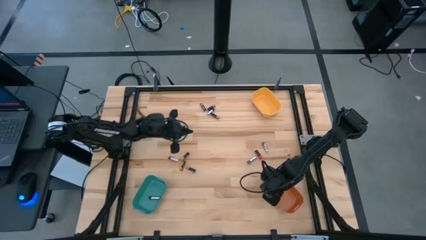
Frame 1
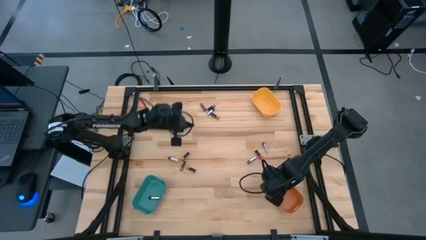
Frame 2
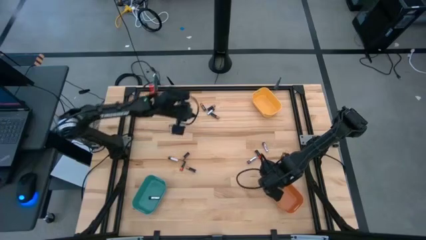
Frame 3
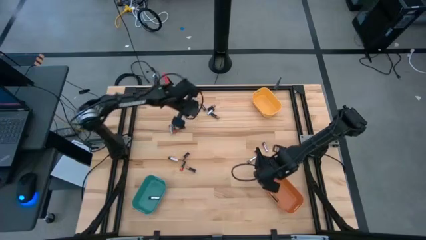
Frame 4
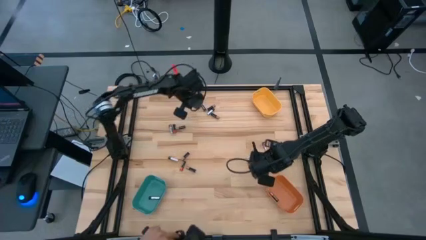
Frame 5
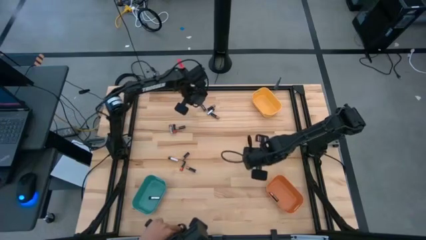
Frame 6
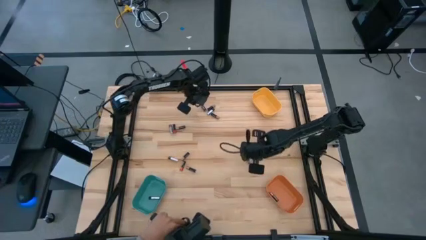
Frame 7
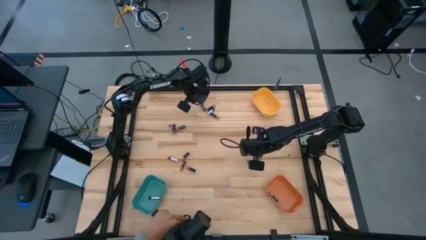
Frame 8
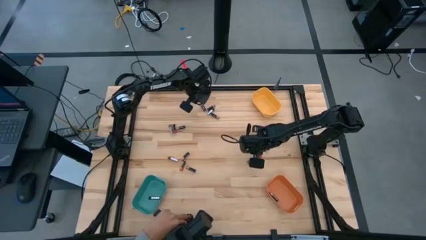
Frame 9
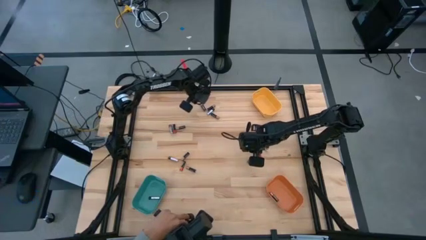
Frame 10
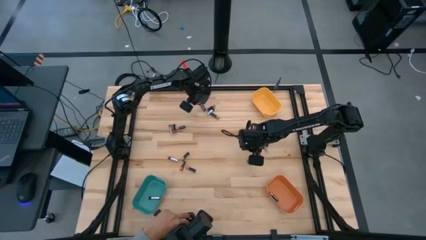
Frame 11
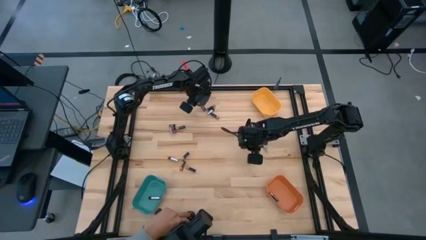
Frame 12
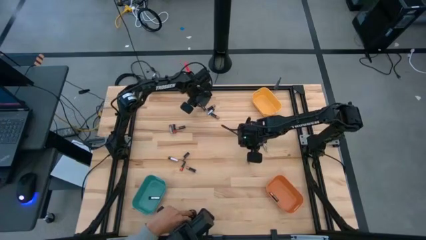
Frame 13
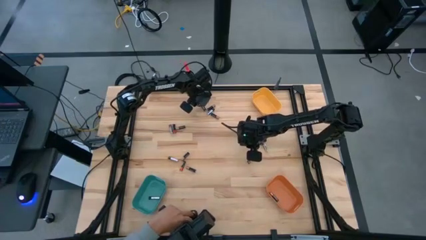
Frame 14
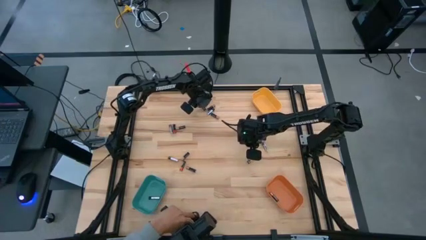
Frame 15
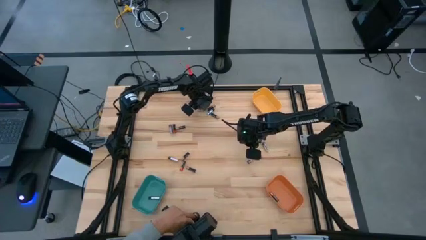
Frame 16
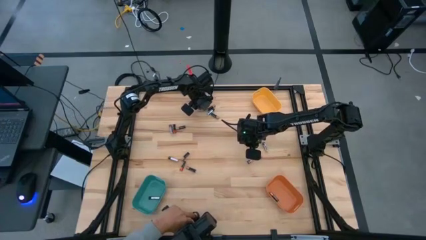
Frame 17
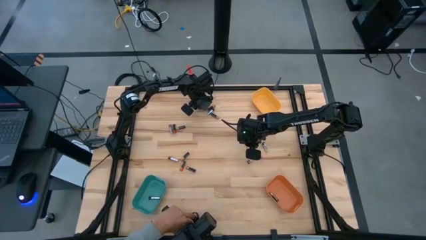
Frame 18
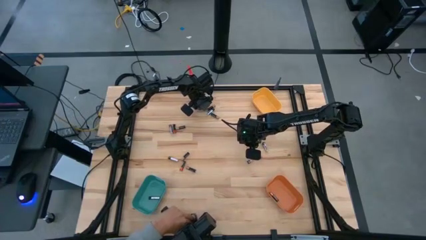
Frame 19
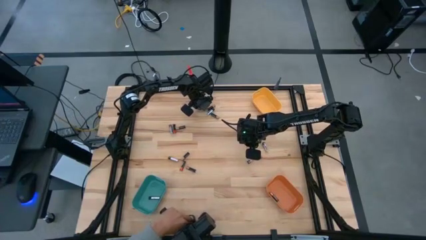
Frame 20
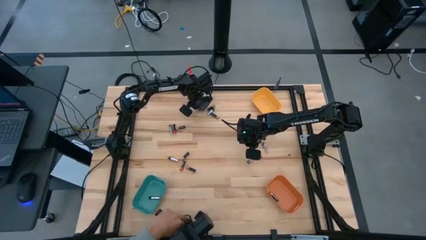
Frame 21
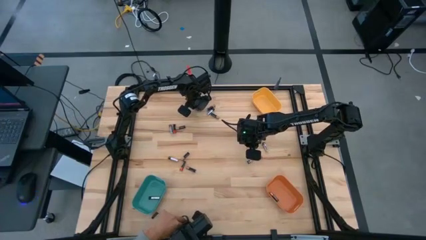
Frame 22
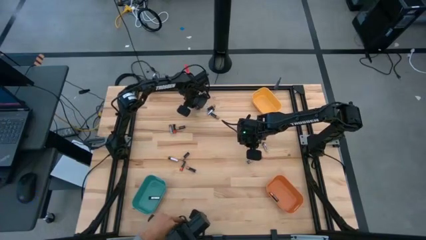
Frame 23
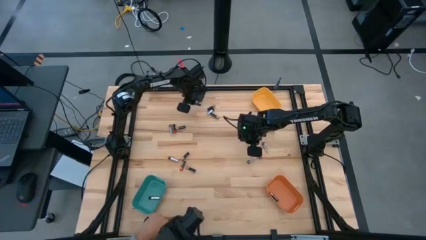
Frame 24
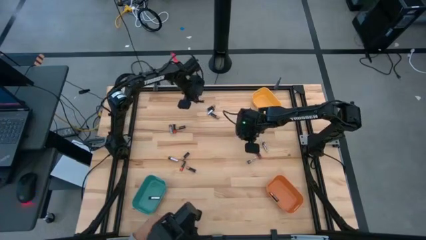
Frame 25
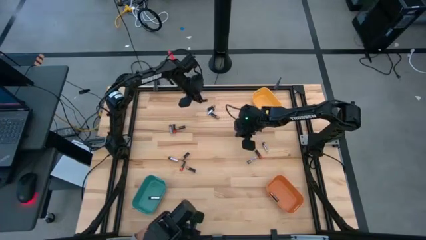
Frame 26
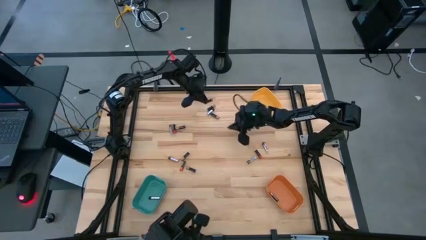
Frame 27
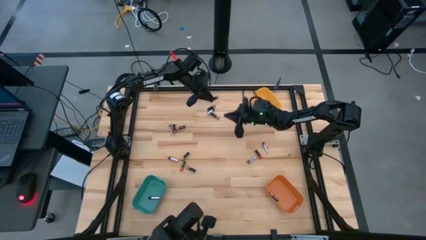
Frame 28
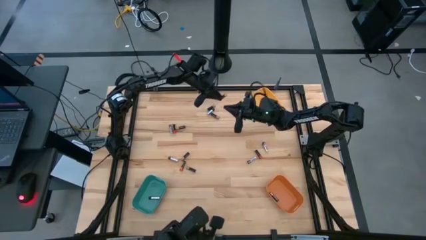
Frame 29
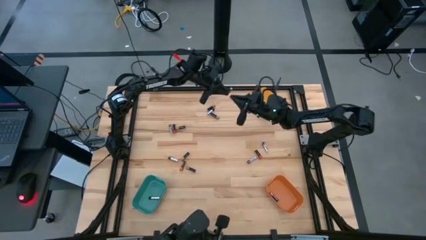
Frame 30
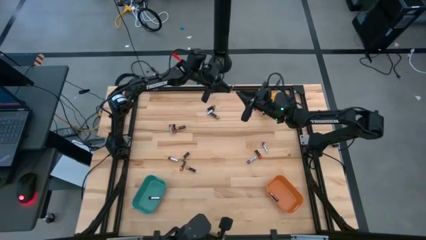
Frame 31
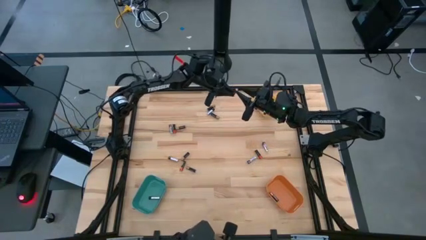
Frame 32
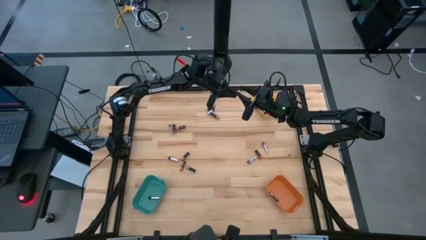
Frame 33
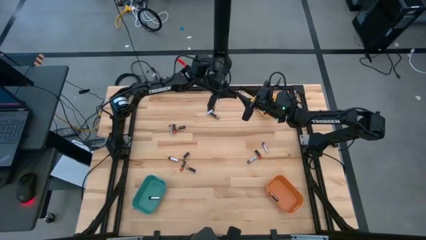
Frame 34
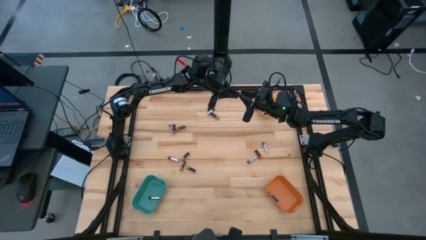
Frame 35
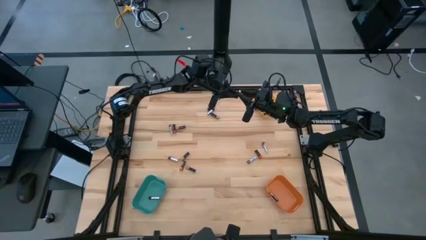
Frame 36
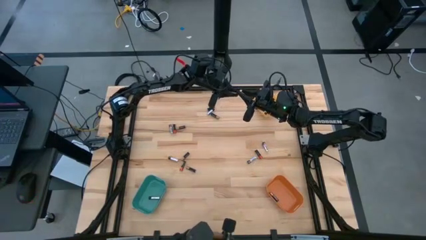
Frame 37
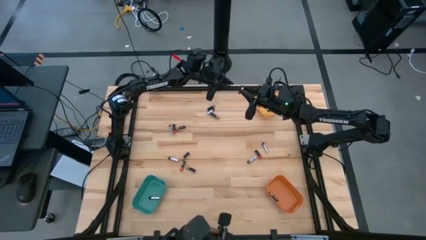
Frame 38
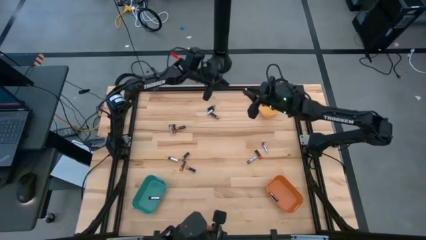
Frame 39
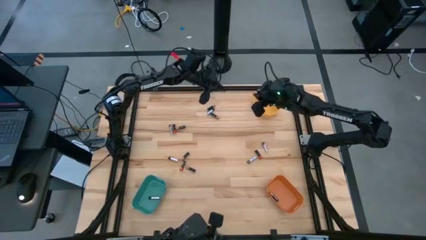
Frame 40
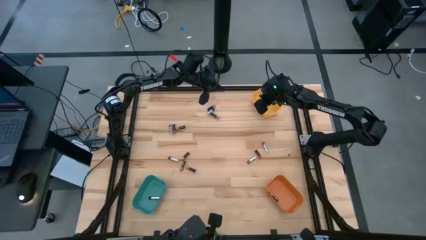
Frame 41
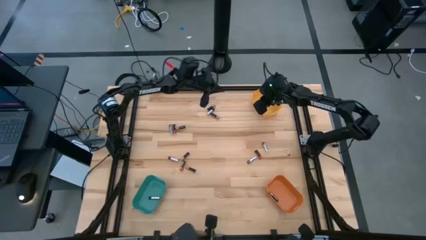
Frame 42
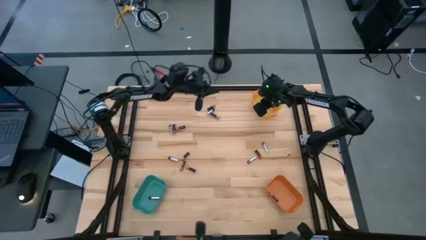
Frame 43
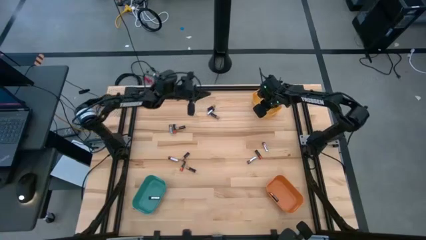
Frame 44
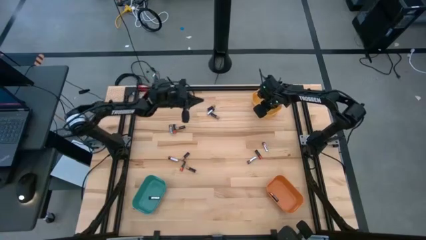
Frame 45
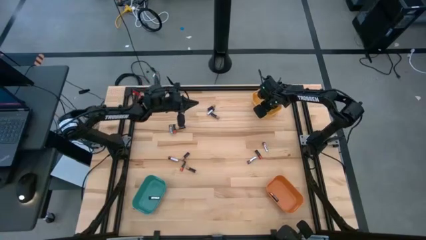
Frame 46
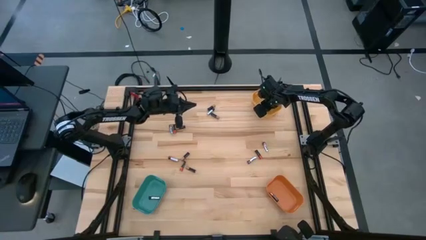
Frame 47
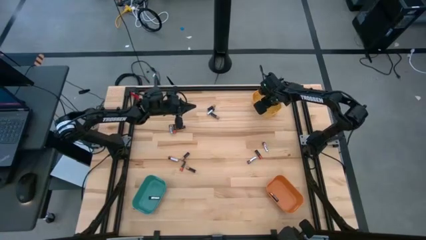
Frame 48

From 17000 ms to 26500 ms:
Task: Sort batteries
Put the red battery into the yellow bin

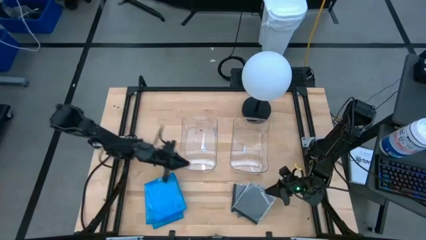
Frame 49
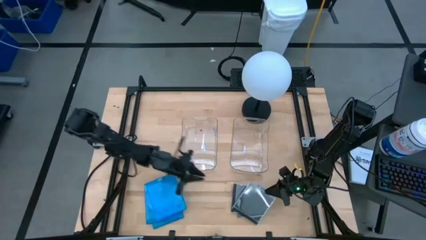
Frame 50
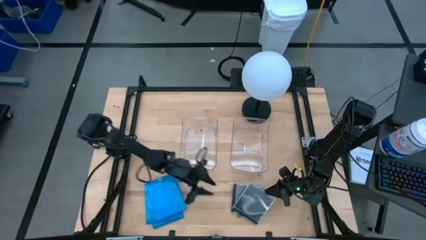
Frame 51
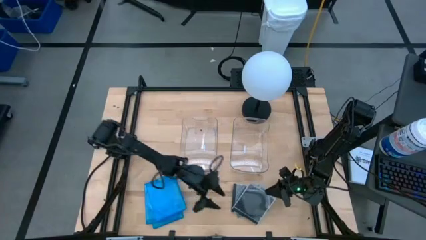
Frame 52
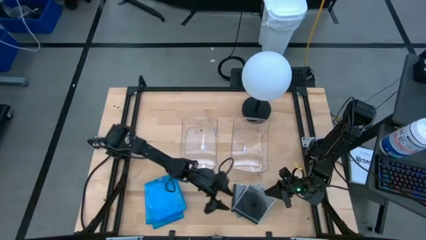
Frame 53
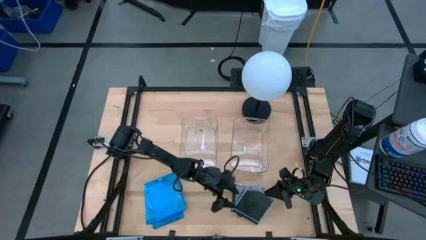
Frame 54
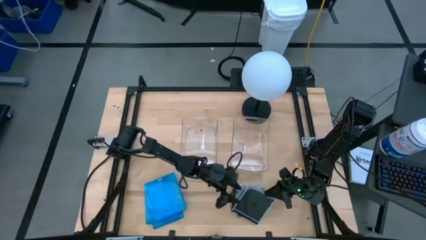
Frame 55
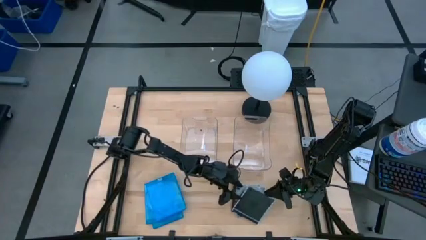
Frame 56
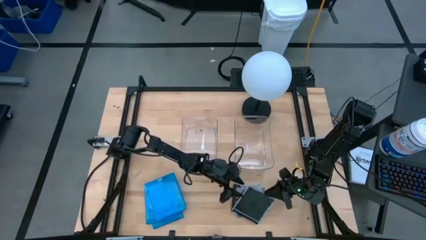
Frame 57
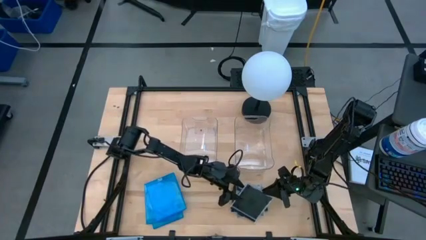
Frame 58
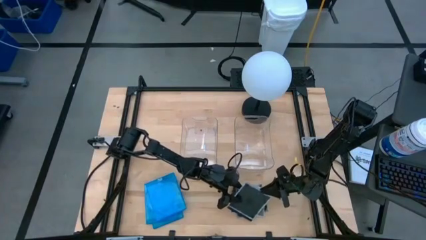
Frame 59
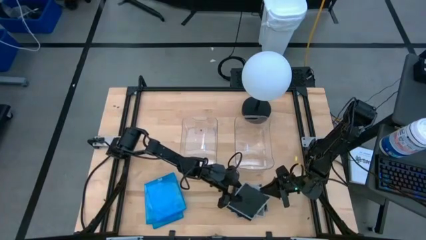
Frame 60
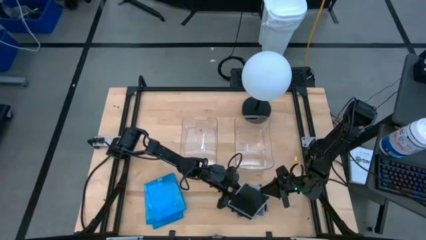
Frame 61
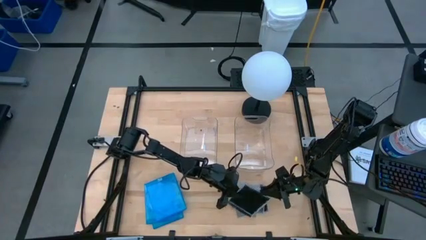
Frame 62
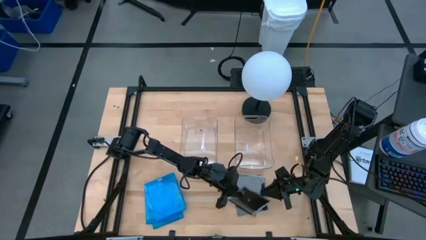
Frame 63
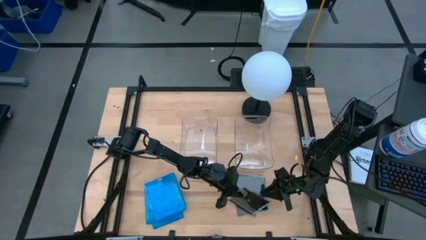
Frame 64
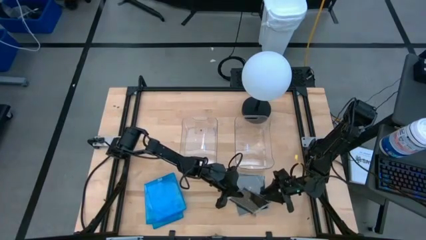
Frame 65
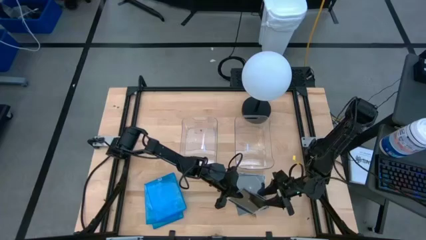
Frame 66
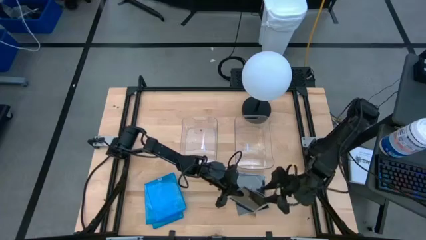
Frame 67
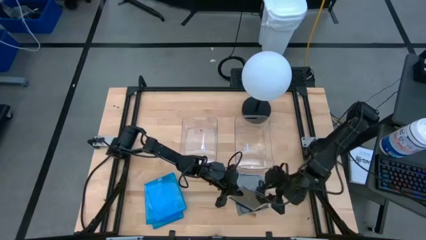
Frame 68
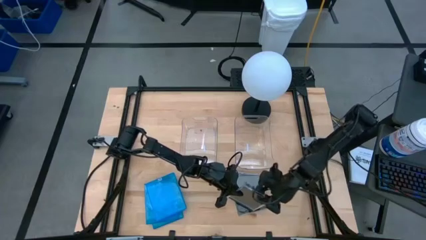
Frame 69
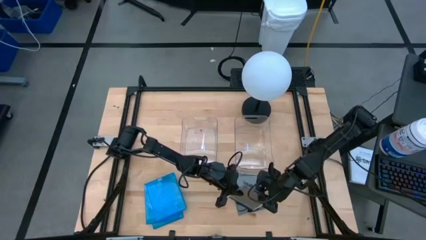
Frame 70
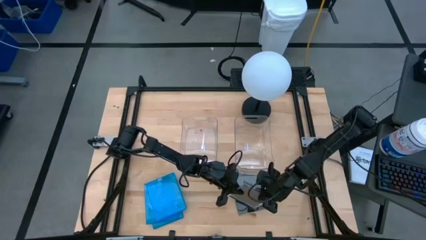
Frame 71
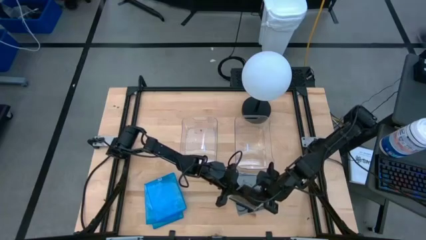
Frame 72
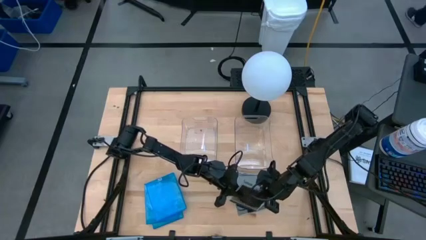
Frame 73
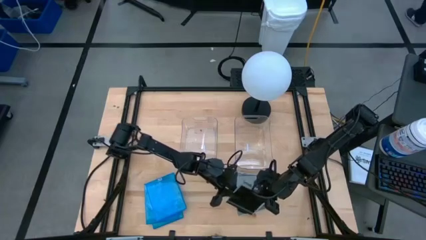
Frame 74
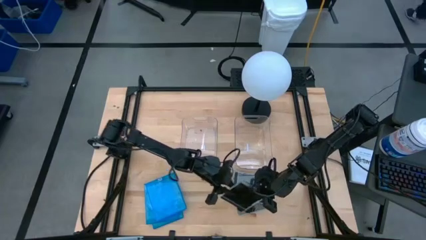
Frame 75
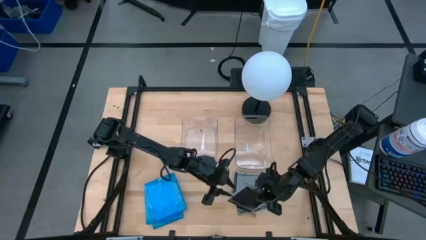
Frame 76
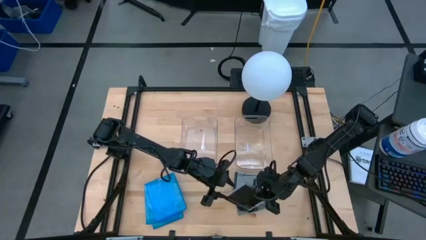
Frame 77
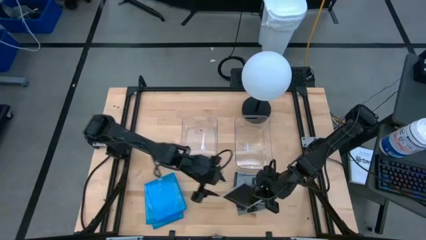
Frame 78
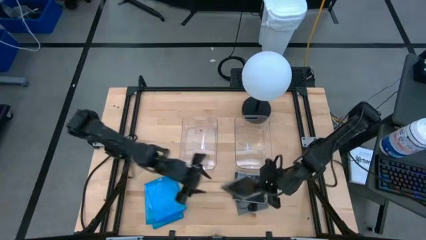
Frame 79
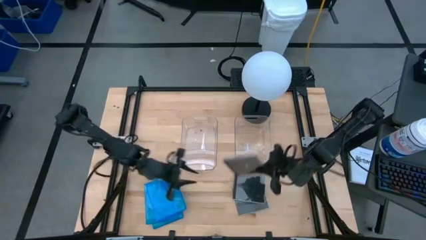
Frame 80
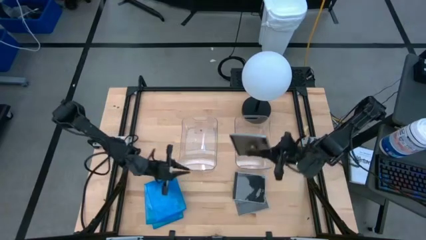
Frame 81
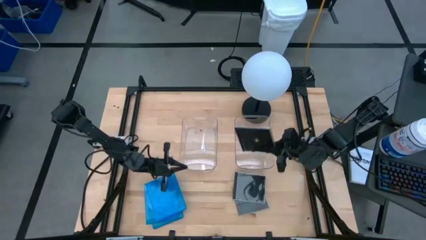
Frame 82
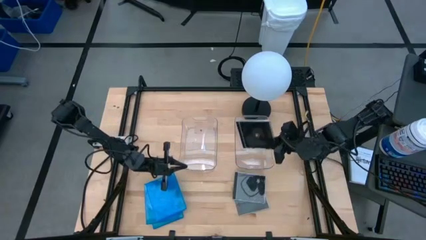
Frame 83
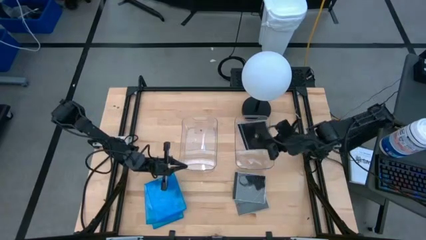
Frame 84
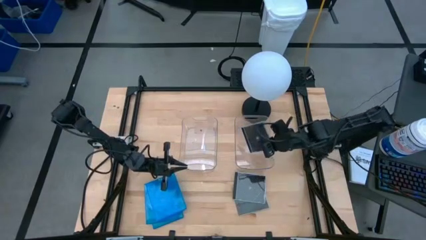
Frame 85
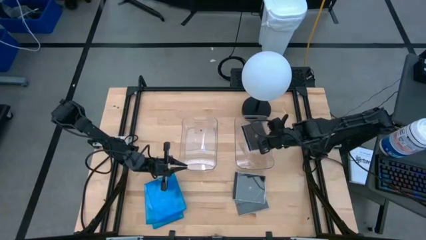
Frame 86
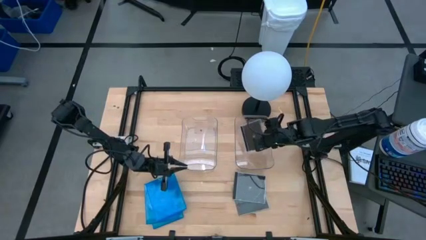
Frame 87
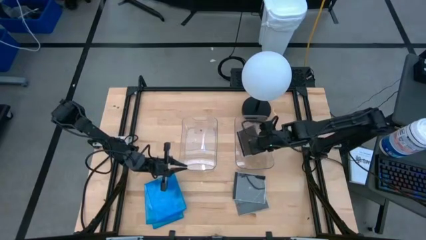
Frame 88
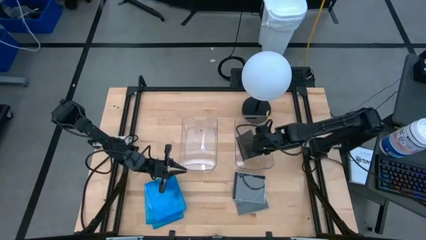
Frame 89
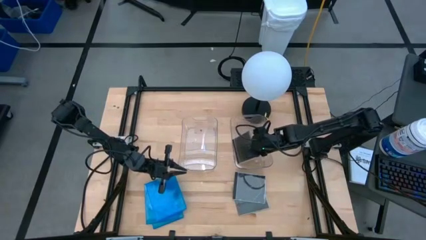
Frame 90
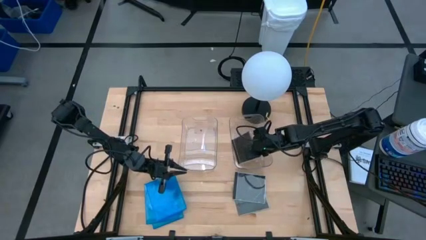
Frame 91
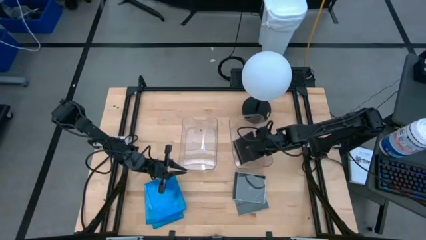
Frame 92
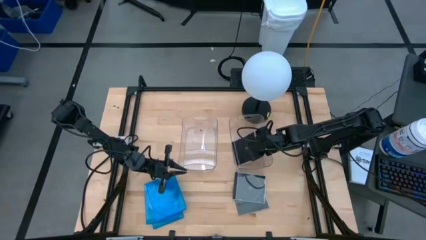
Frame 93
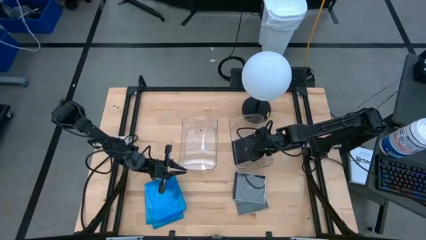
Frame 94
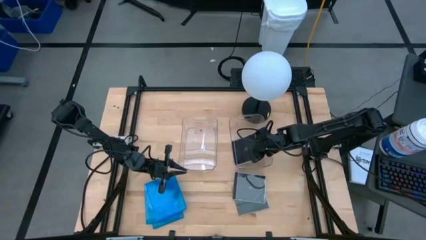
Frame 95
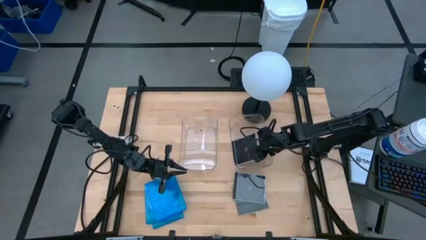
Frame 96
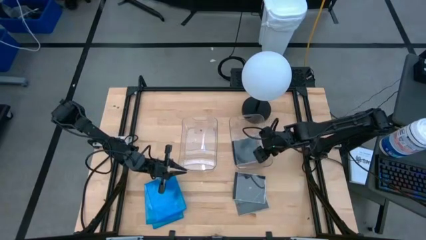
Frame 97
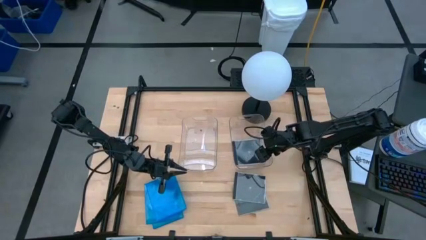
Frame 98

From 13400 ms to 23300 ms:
Task: Pick & place jewel cases by type
Put the black cd case into the right transparent bin
